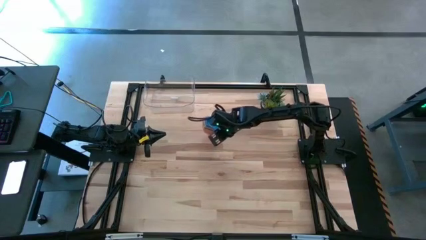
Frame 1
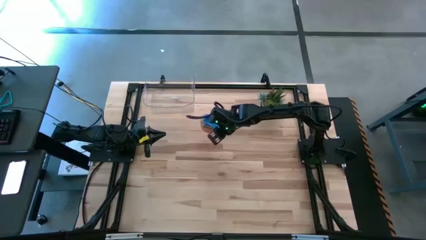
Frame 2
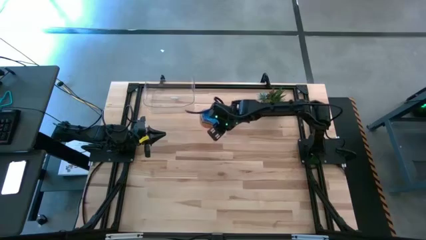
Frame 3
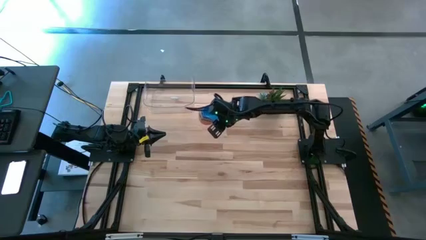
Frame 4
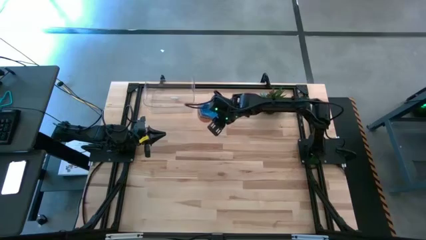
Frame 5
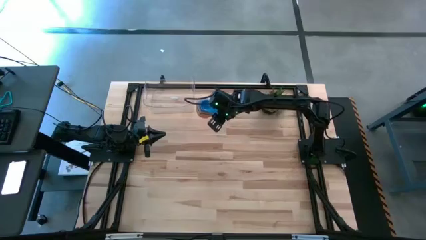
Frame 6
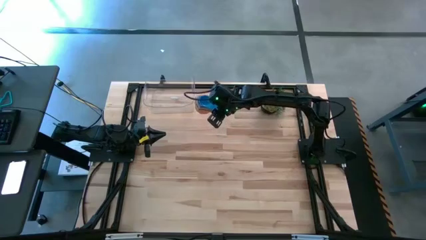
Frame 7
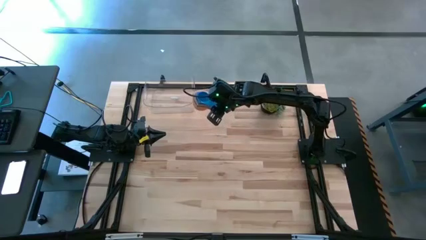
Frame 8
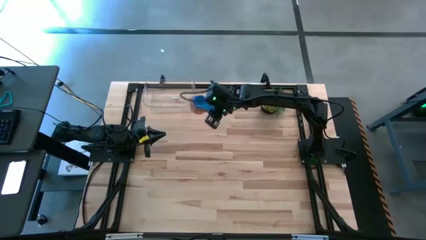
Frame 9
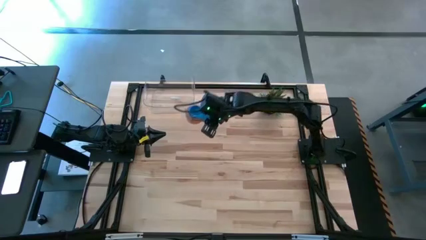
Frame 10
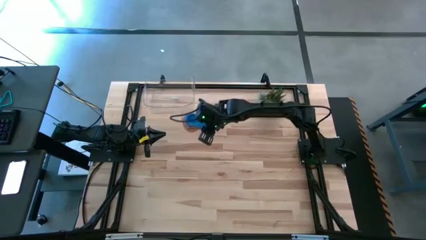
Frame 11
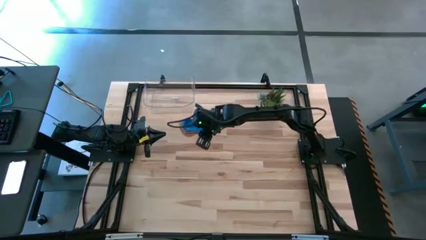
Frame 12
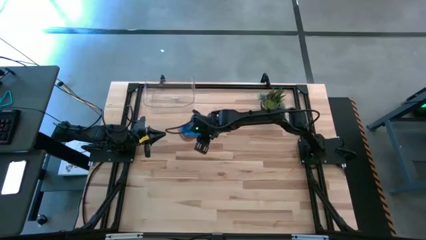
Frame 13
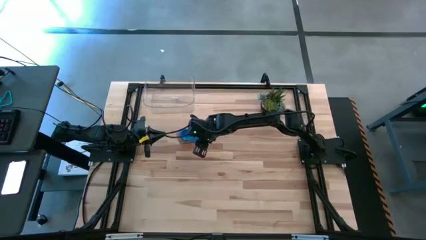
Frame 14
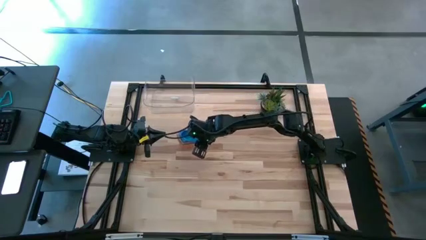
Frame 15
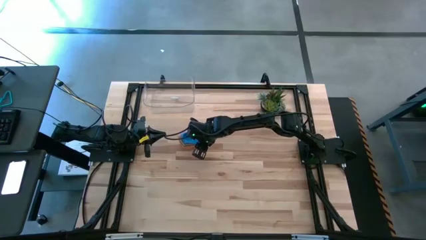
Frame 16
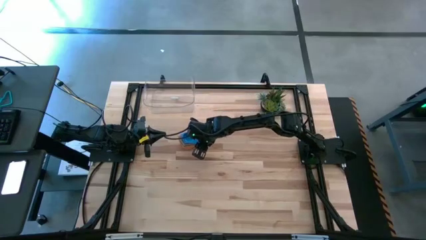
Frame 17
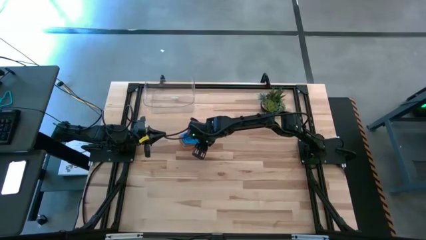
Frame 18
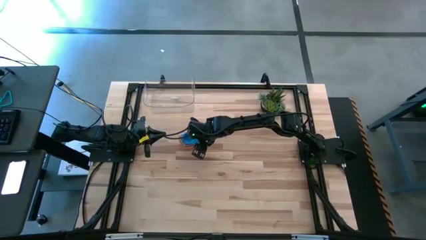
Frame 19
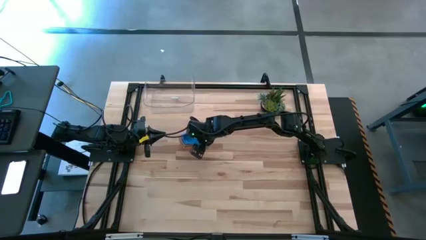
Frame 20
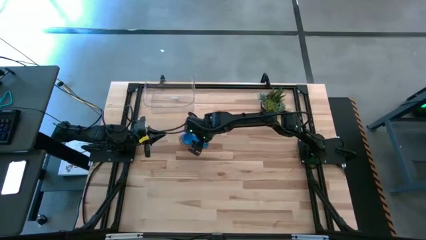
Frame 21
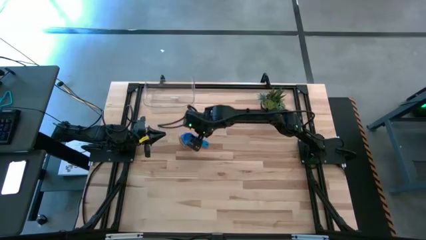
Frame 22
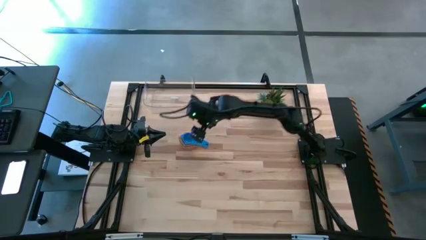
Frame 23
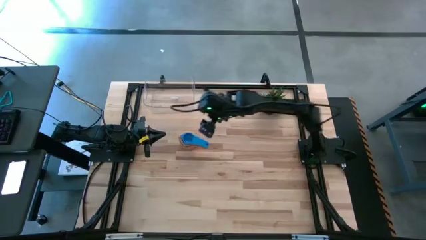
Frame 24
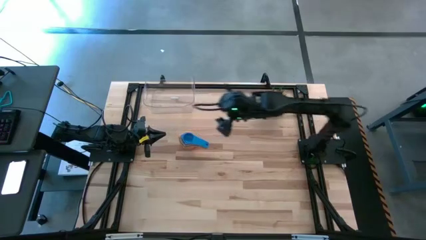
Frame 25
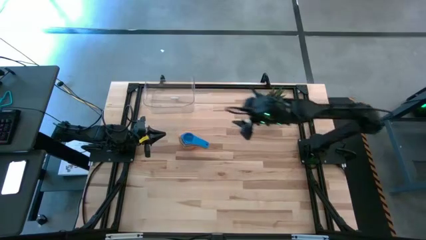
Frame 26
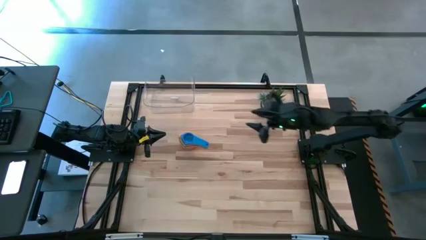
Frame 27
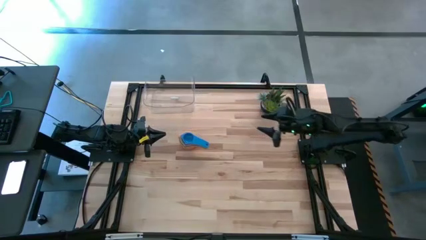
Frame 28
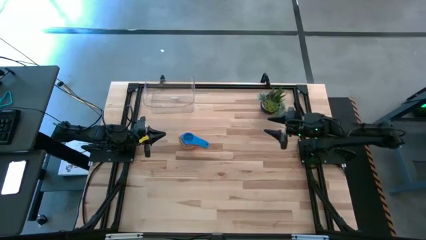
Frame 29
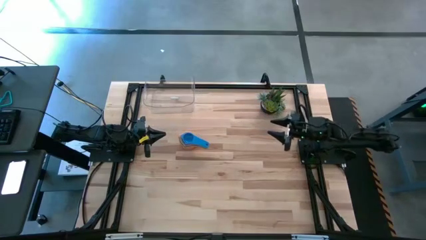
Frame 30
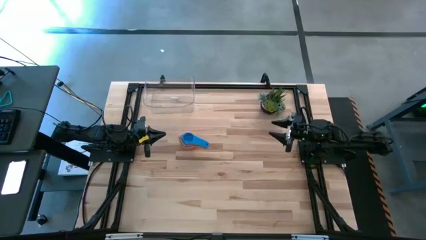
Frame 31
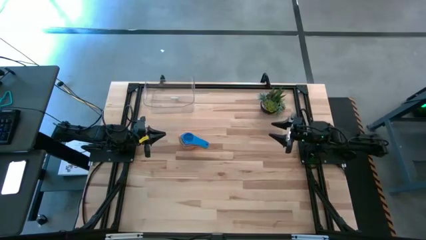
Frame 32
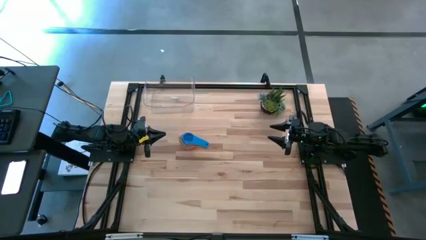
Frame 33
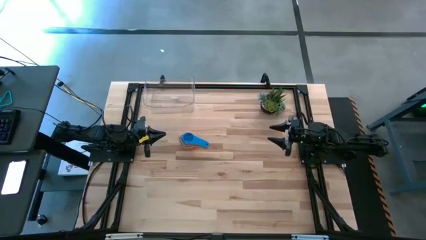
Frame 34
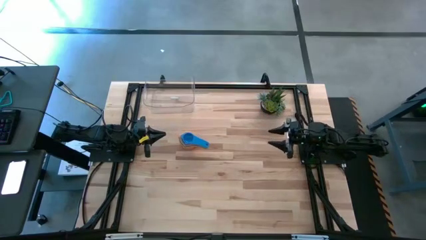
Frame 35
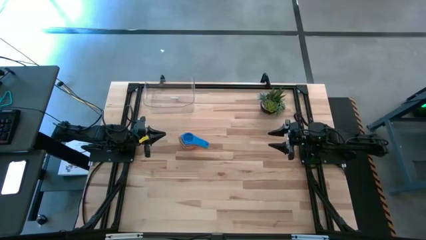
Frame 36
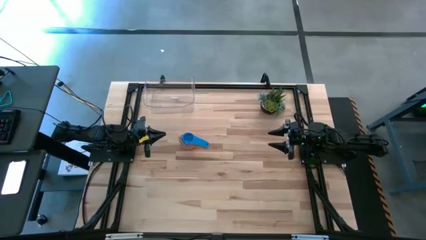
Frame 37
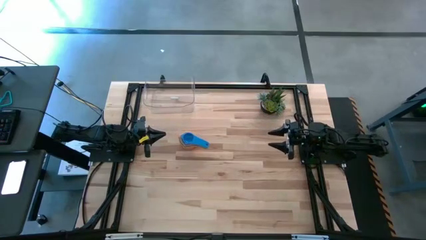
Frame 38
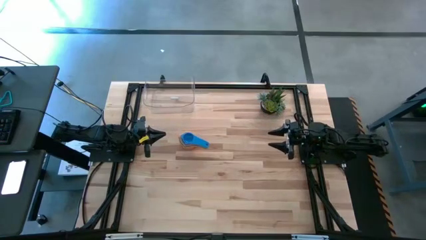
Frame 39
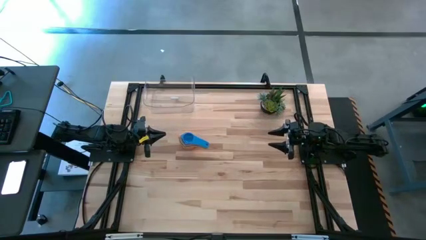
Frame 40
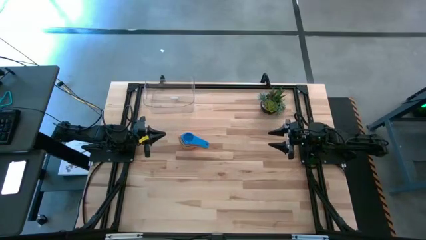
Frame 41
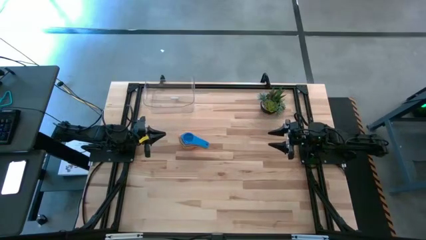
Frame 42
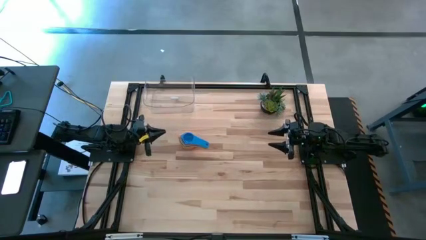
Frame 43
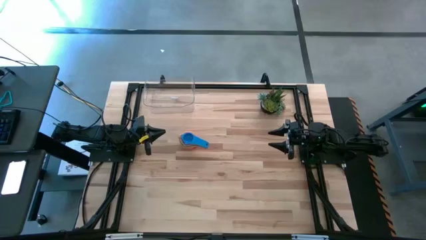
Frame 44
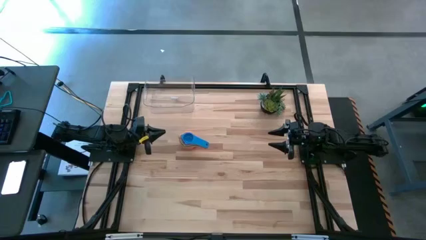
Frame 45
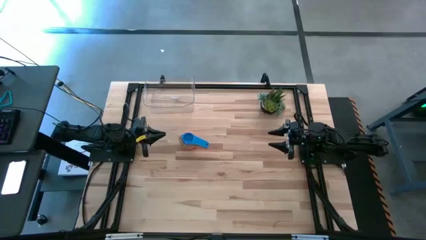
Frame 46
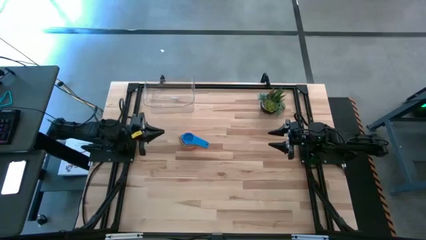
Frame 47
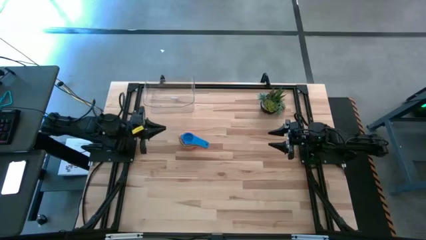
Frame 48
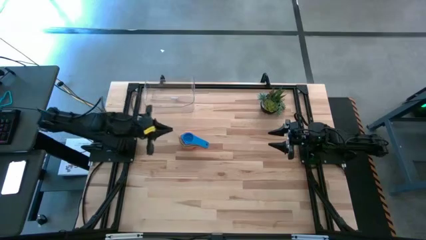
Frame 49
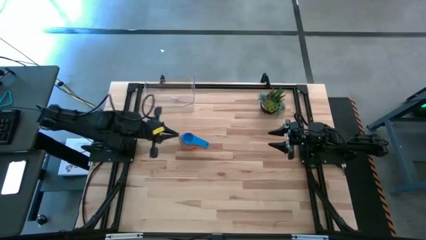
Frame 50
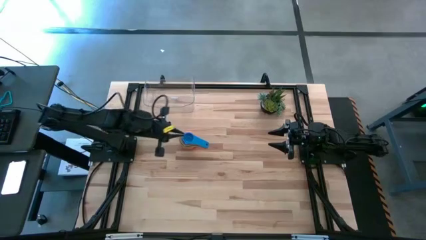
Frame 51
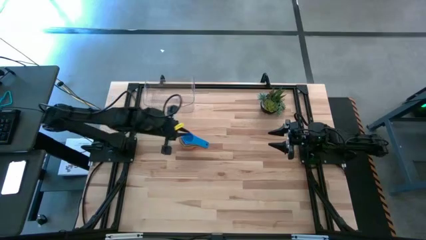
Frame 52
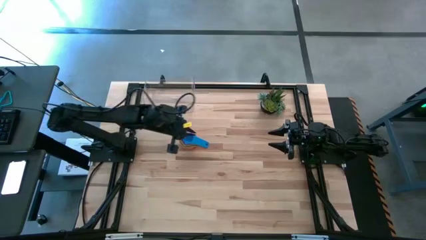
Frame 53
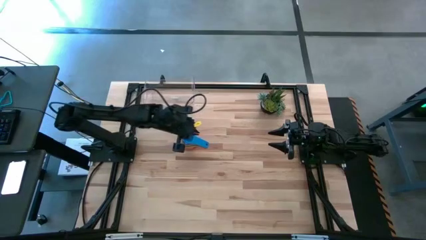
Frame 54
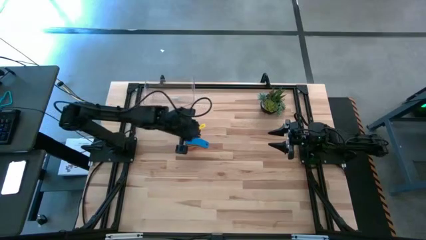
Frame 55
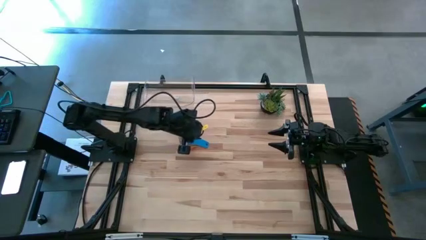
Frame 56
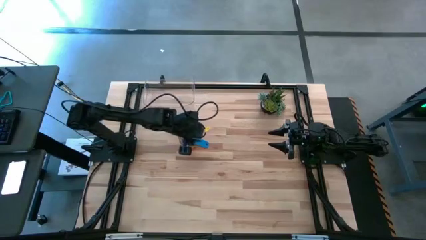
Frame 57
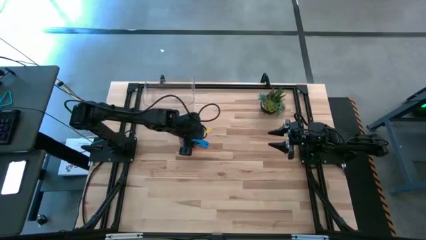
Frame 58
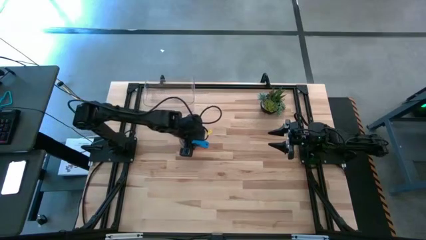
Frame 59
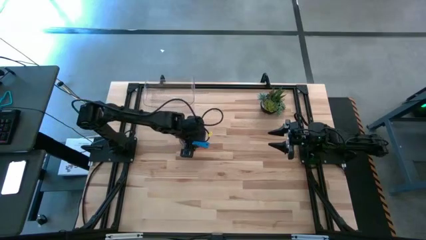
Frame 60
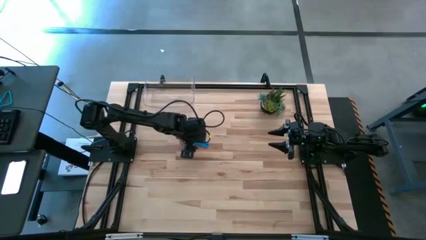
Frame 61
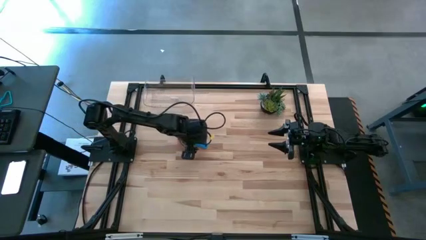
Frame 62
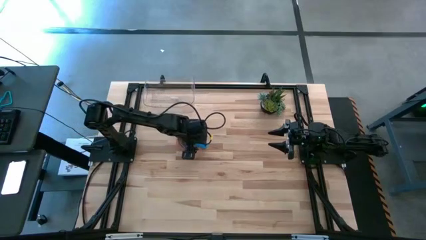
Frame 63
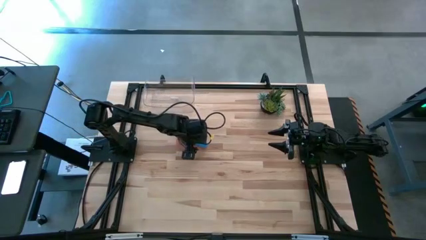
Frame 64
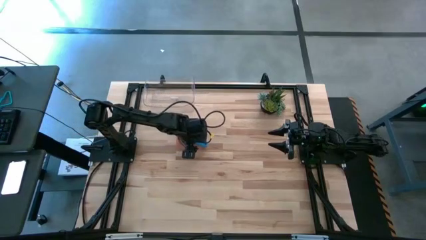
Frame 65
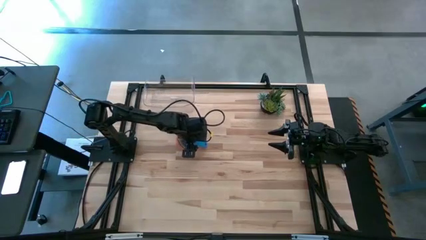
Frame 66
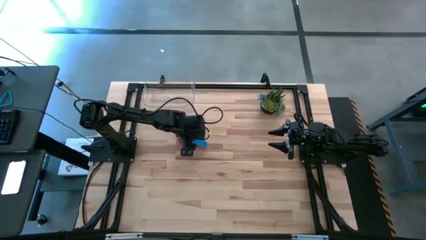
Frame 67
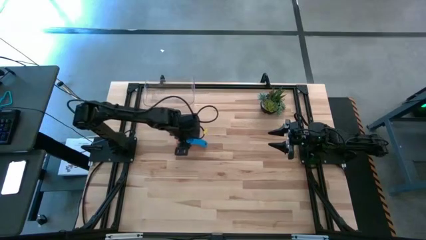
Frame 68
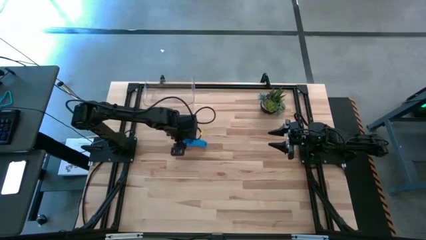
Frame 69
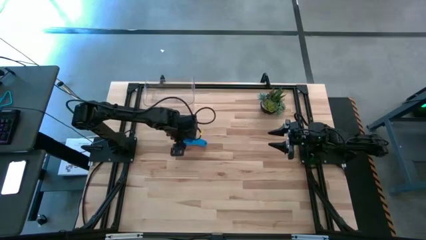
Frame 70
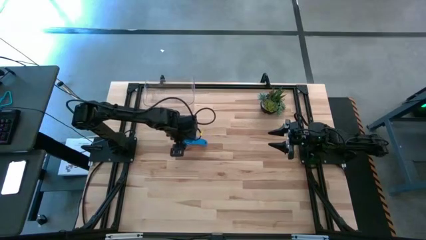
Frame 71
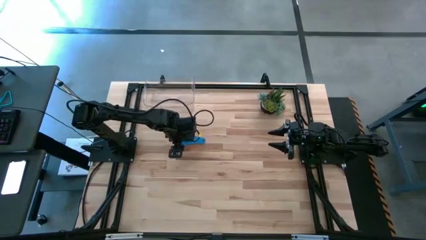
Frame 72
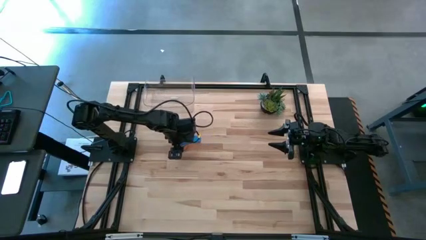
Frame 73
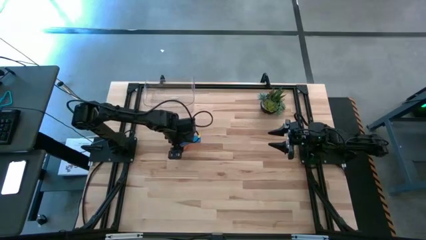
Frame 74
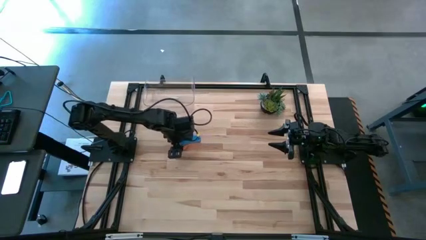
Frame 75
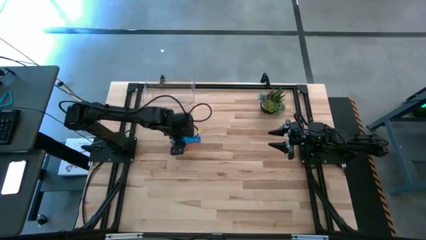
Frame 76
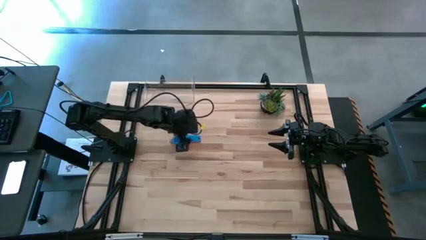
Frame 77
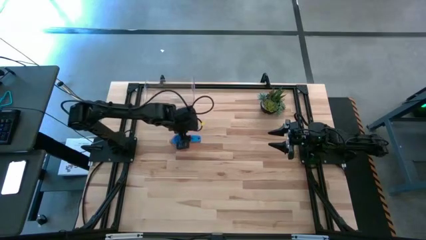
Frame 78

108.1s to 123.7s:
Task: Nest measuring cups in basket
Put the stacked colored measuring cups into the transparent bin
